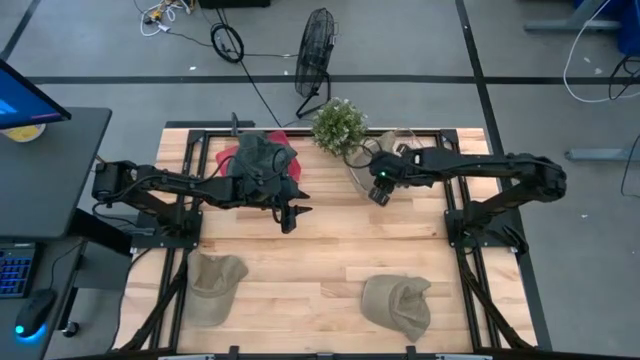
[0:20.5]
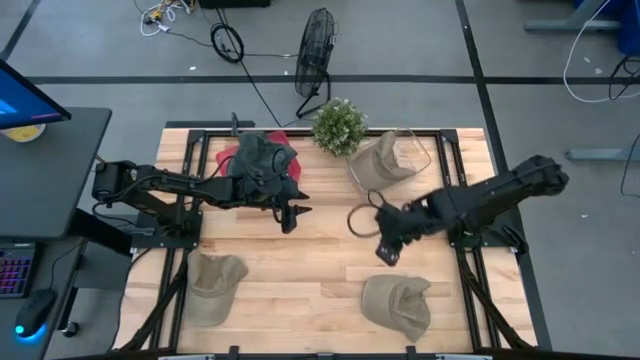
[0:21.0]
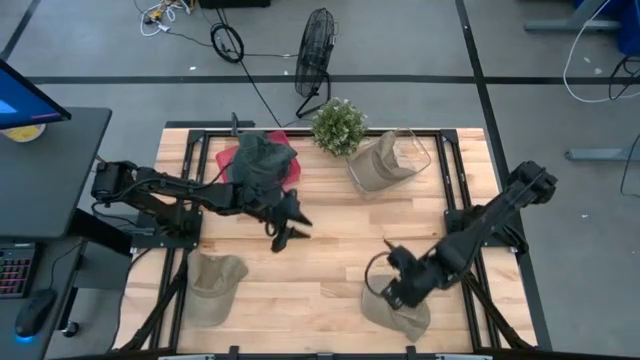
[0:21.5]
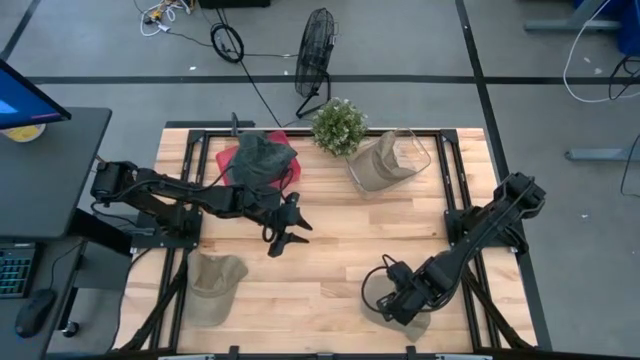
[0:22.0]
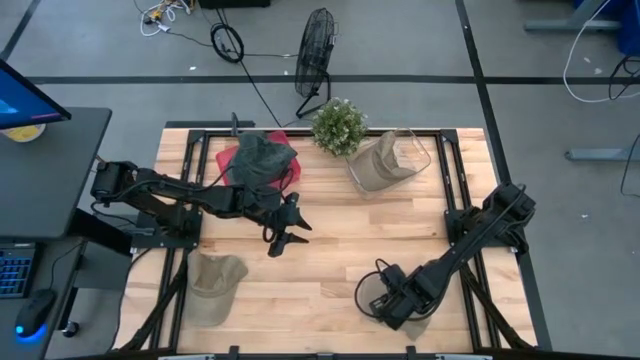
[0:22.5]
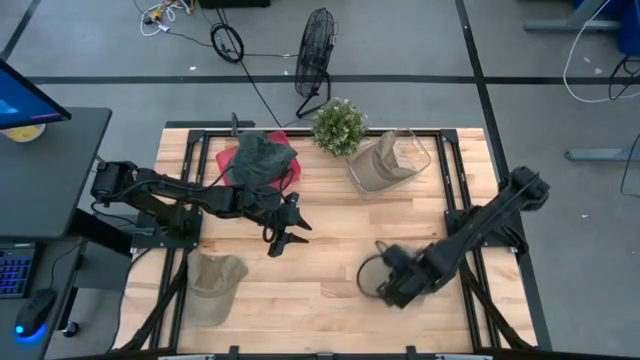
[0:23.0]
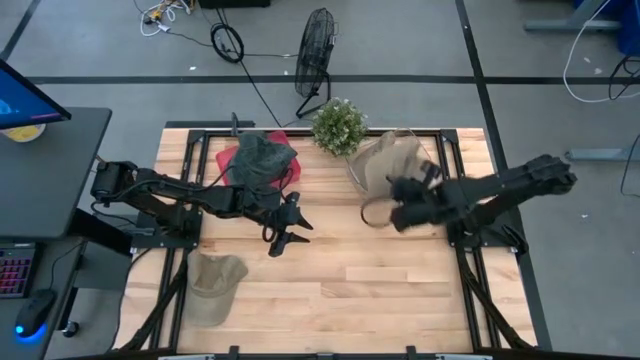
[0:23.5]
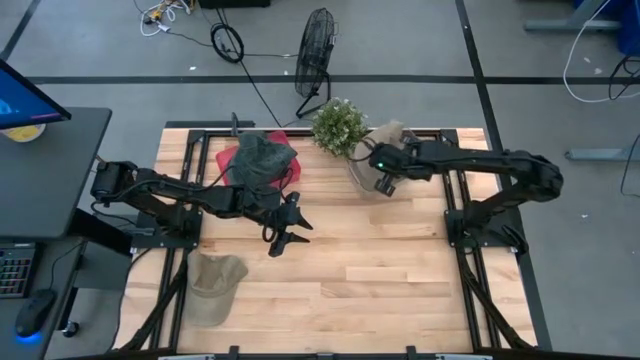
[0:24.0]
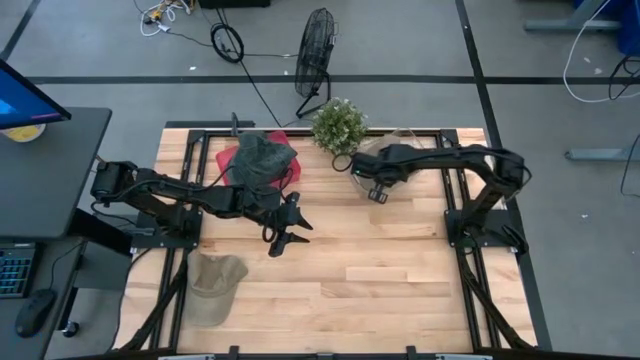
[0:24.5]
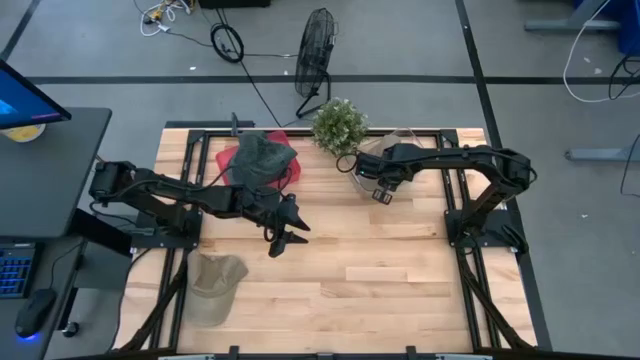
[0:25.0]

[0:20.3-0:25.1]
Task: Pick & Place hat
Put the right brown cap into the transparent bin

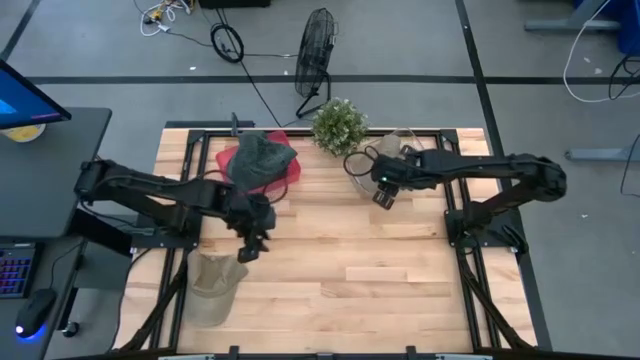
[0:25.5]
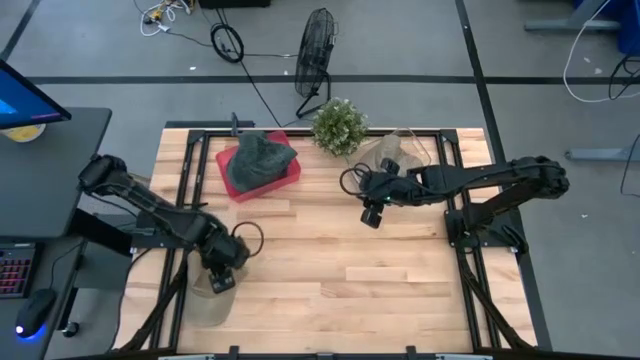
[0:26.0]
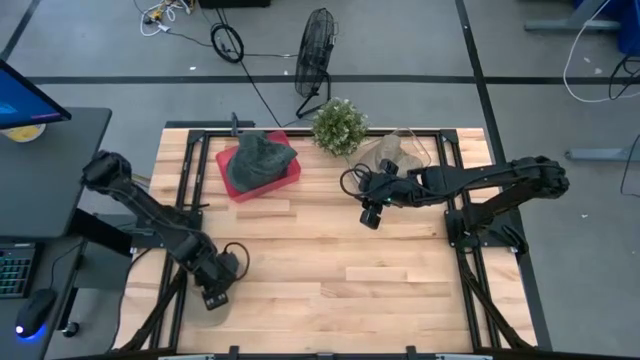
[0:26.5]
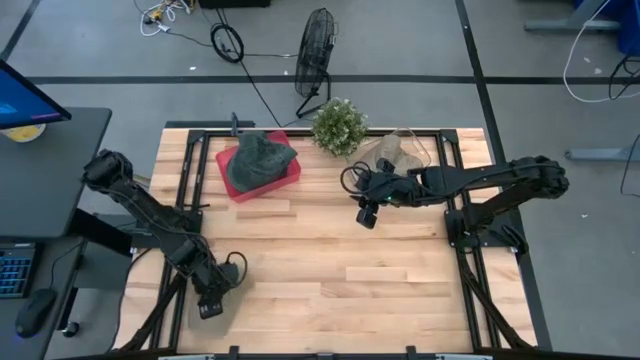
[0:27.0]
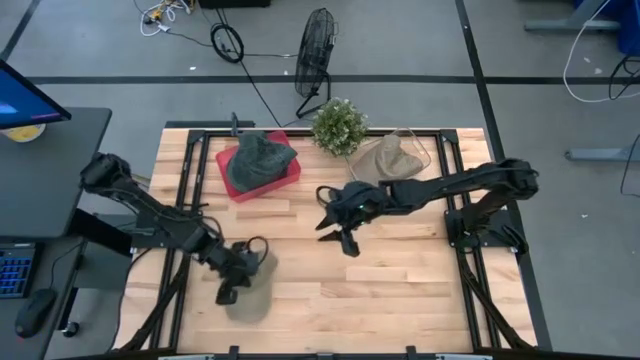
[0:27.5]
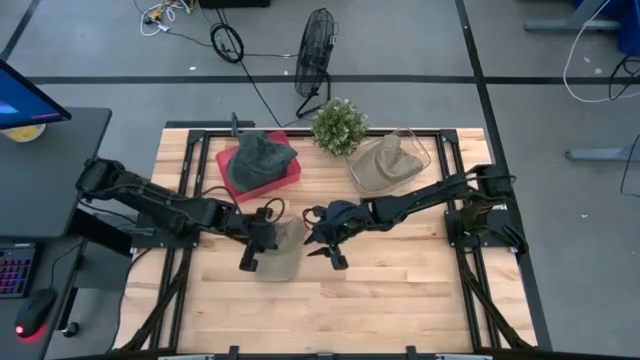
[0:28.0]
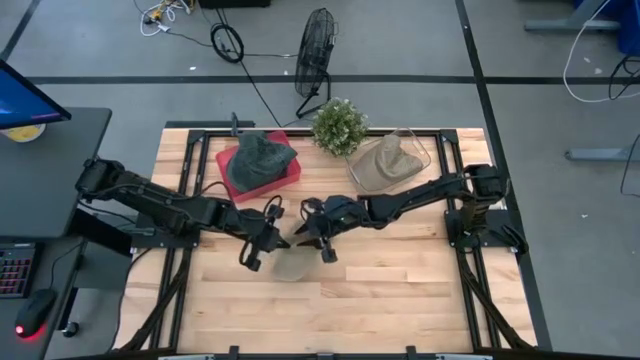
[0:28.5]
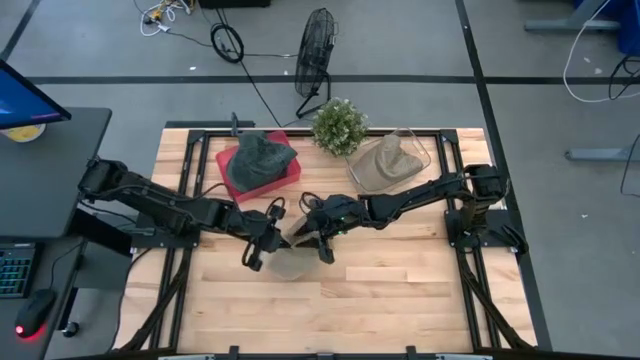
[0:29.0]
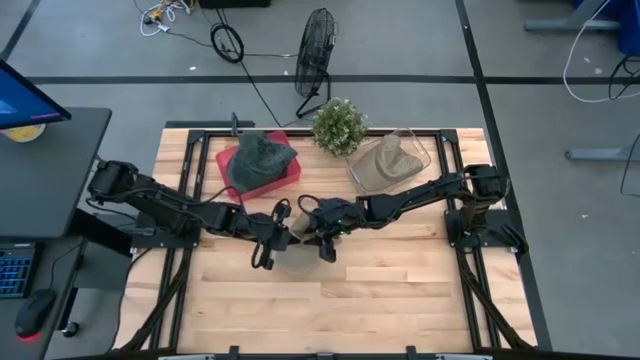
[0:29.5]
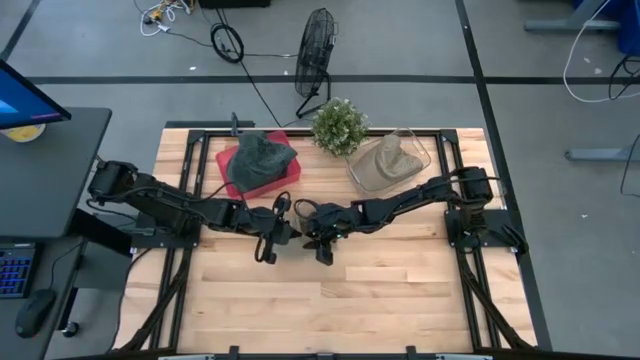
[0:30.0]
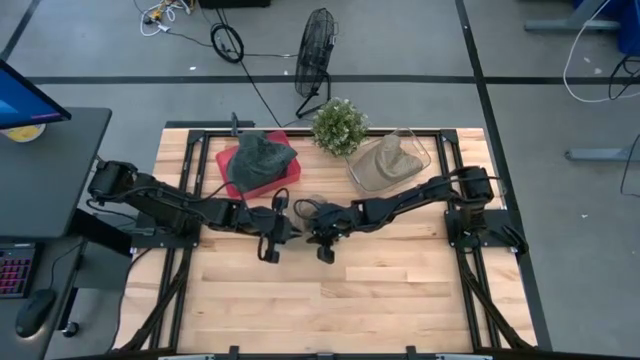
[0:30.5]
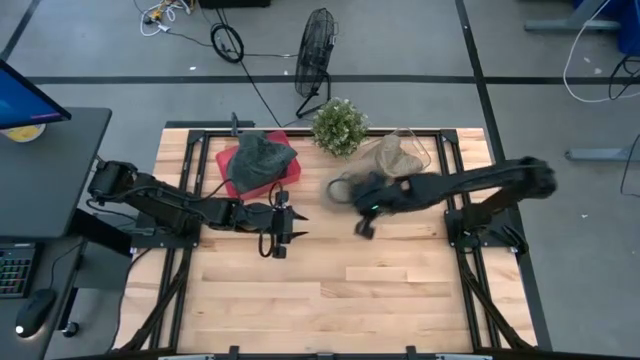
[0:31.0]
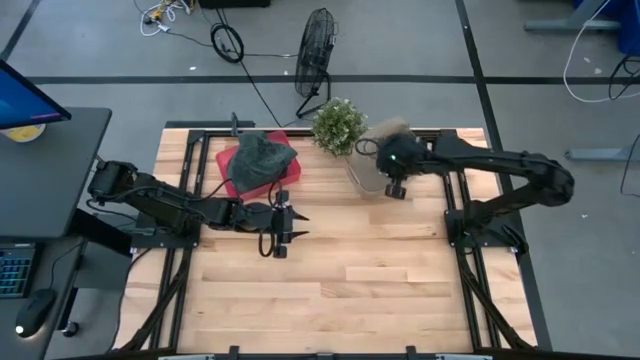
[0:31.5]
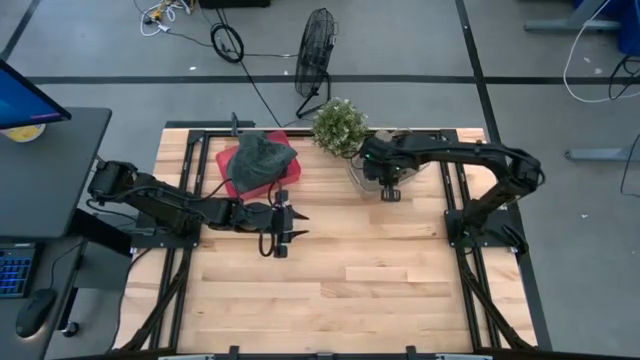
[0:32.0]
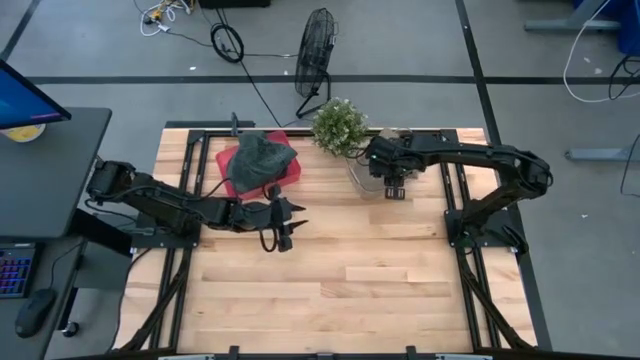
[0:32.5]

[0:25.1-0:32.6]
Put the brown cap into the transparent bin

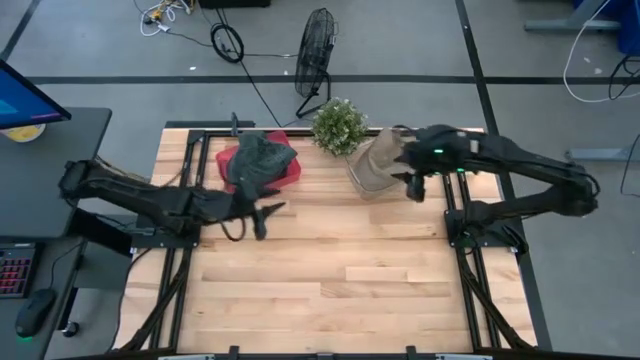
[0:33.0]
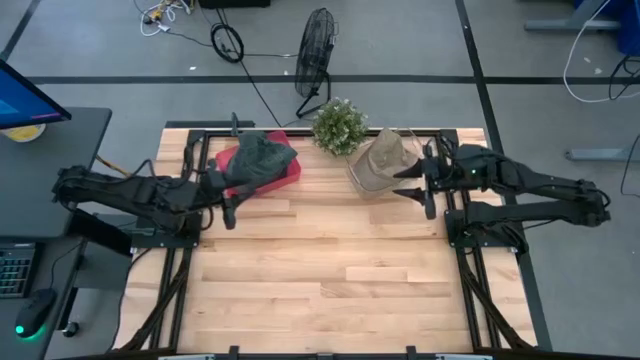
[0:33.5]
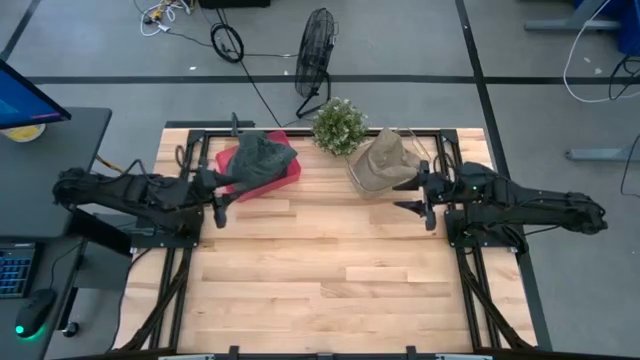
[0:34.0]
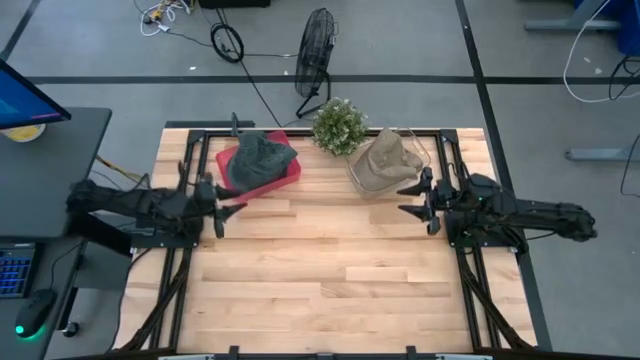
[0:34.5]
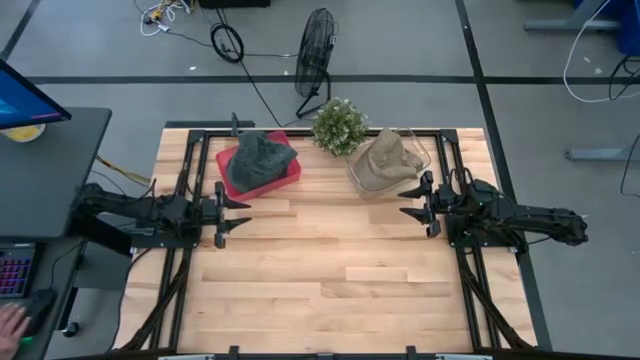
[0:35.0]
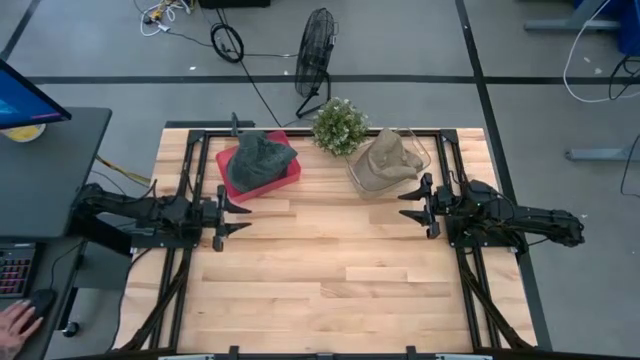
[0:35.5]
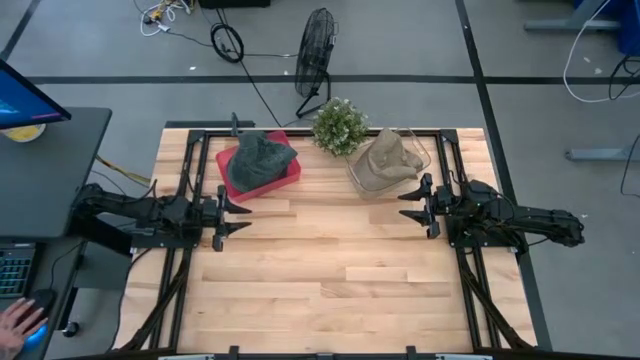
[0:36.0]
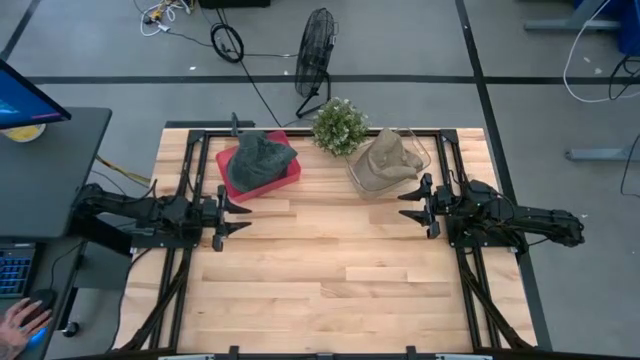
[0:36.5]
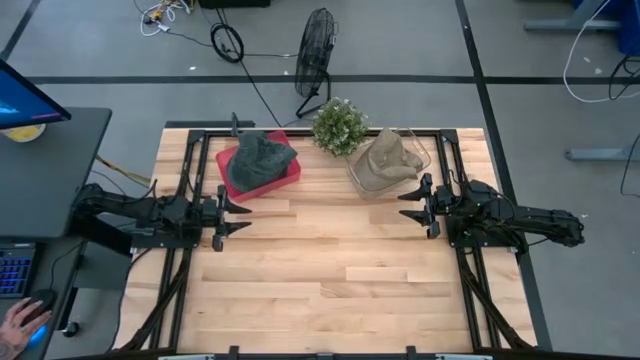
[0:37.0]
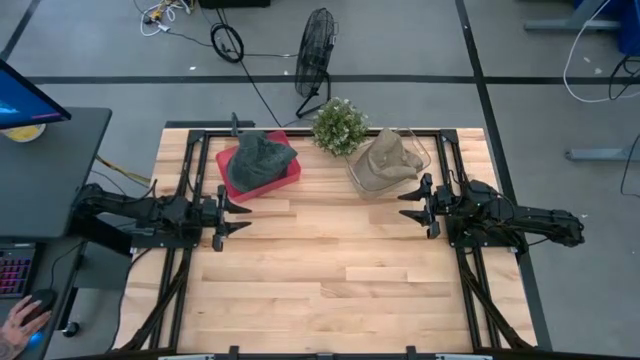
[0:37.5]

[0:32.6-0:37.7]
Return to Home Position

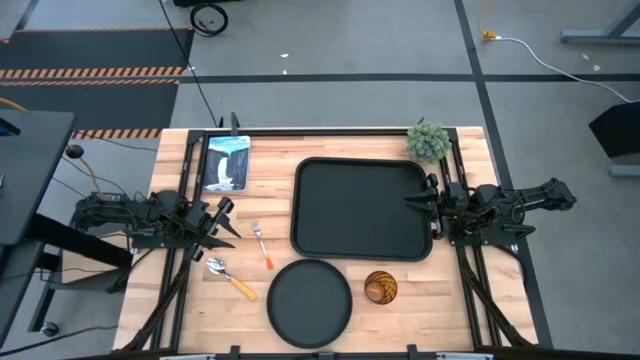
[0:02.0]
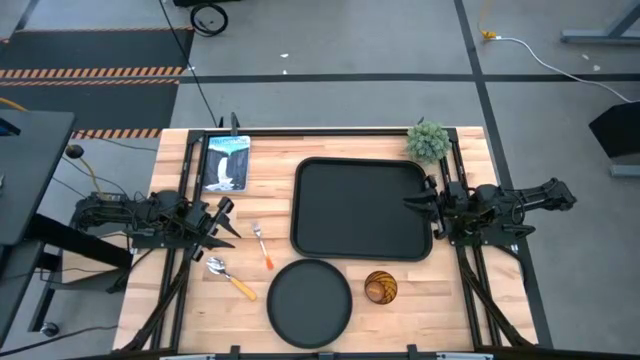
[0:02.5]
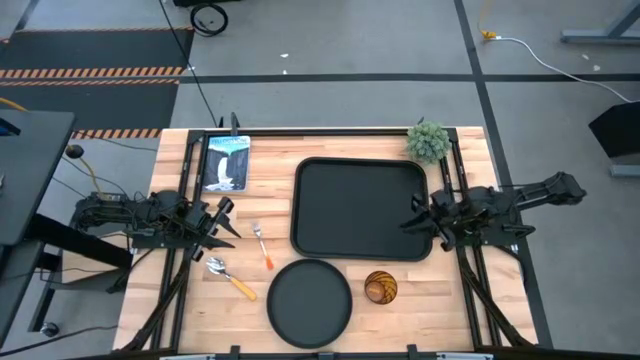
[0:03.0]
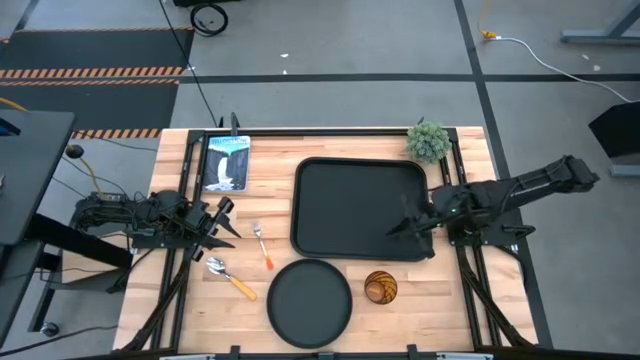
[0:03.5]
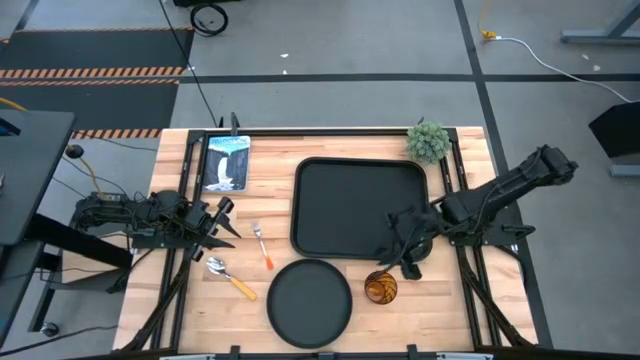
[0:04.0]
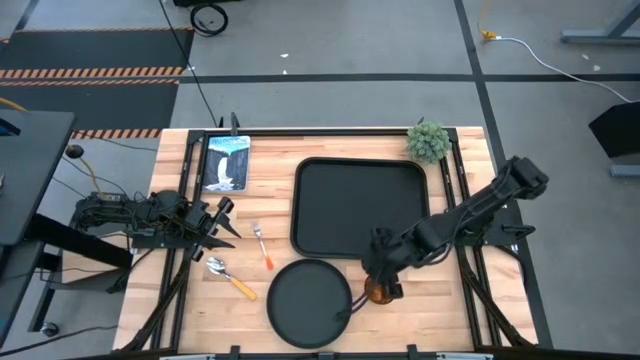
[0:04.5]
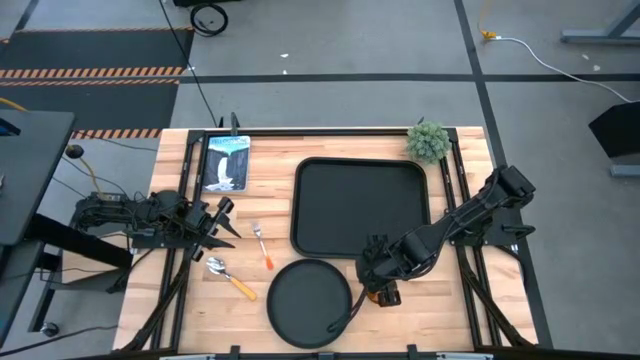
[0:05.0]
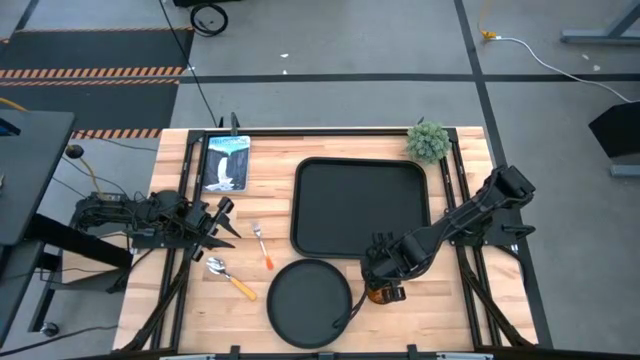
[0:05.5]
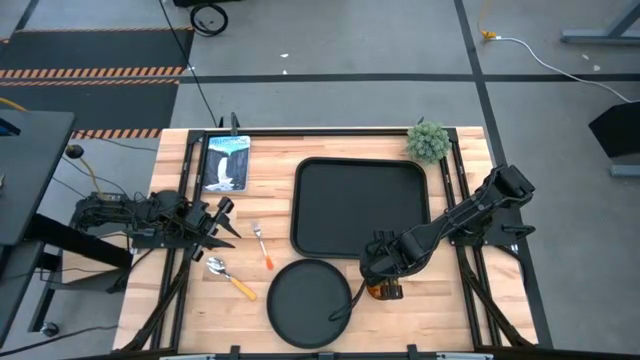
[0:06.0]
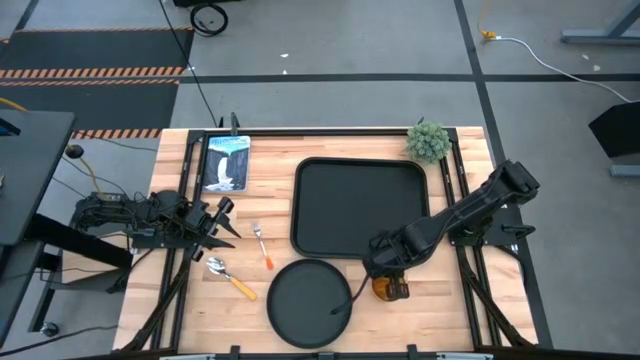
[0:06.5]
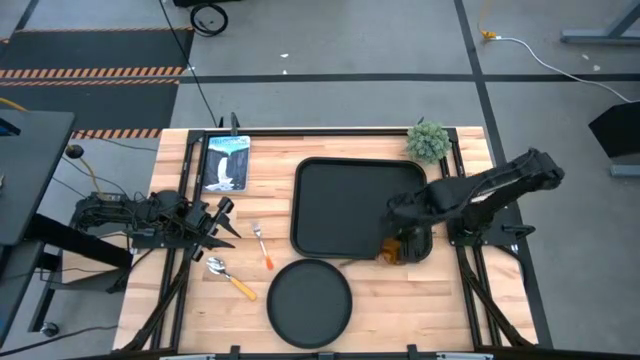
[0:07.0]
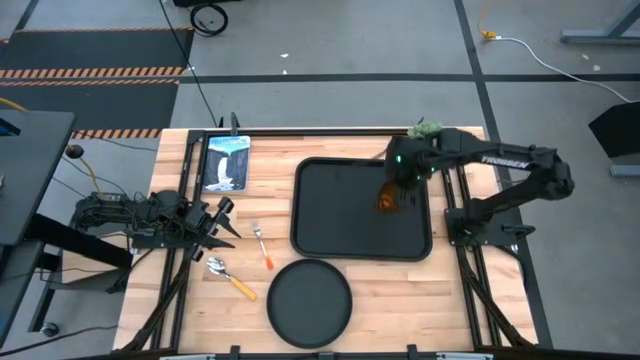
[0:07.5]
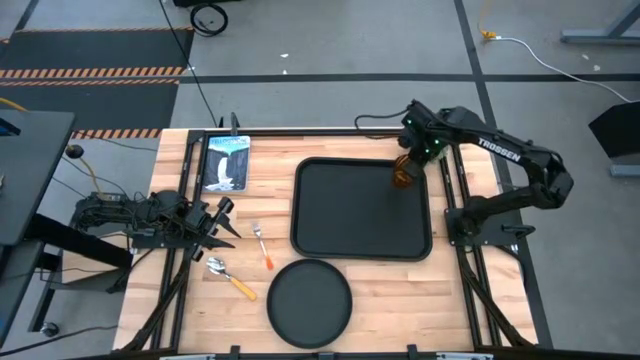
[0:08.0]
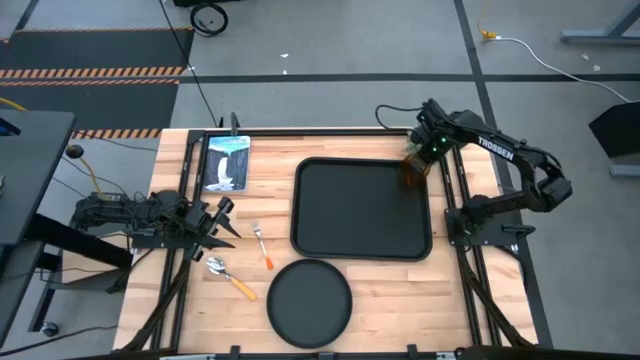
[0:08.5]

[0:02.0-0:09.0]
Task: Pick and place plate/cup/fork/spoon on tray
Put the brown cup to the top left of the black tray
